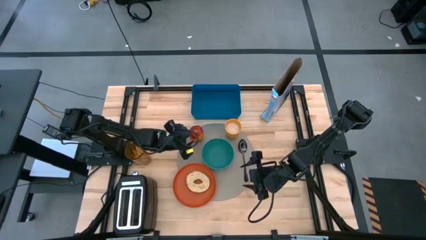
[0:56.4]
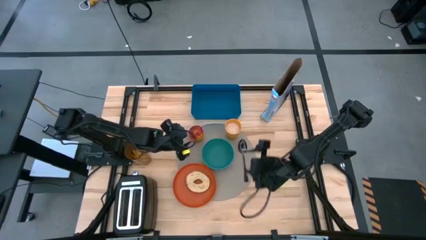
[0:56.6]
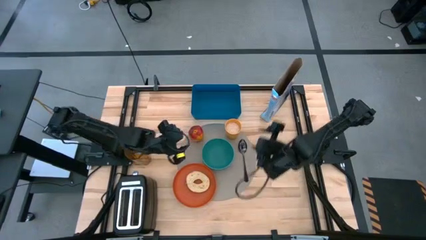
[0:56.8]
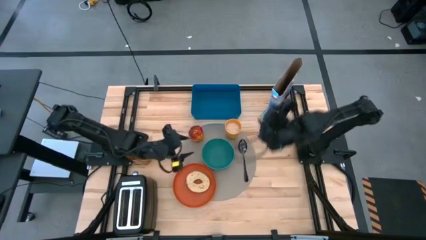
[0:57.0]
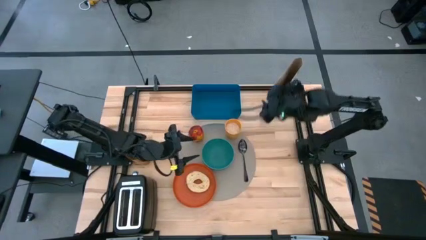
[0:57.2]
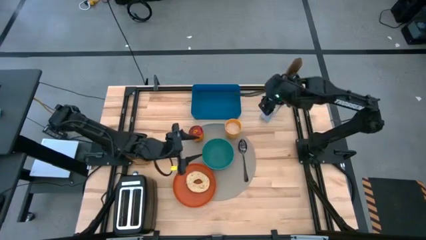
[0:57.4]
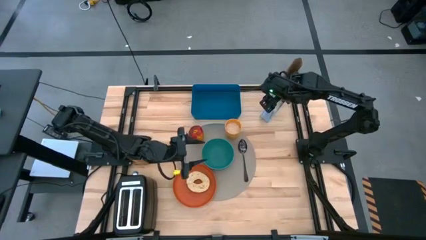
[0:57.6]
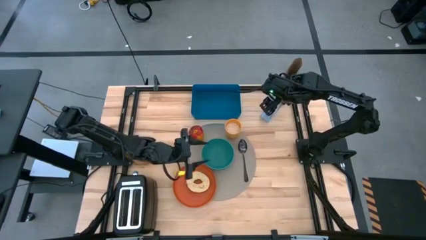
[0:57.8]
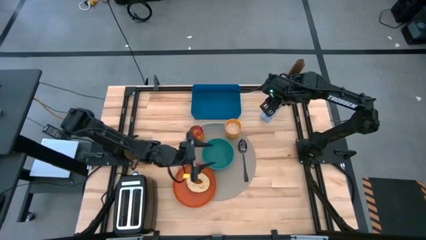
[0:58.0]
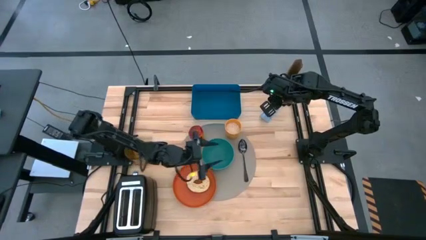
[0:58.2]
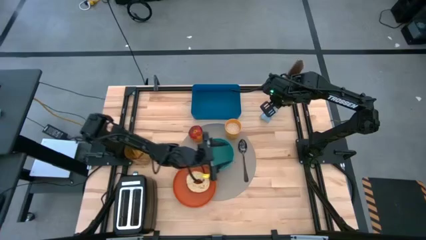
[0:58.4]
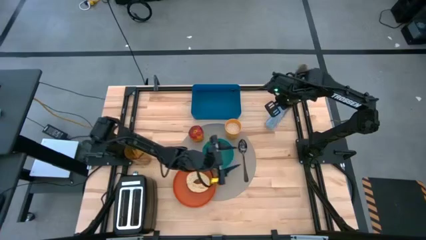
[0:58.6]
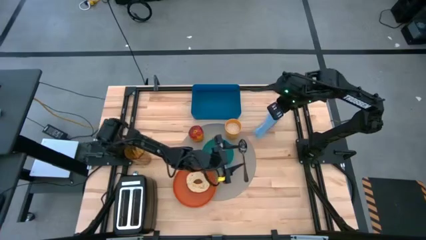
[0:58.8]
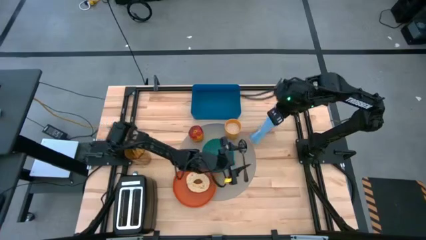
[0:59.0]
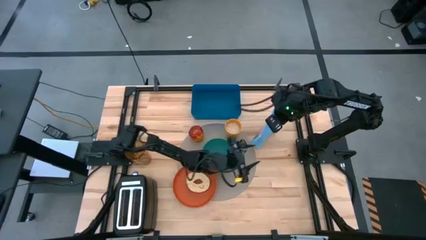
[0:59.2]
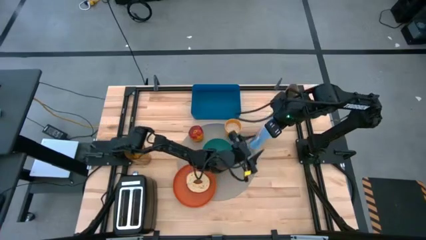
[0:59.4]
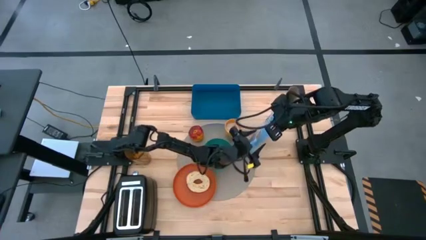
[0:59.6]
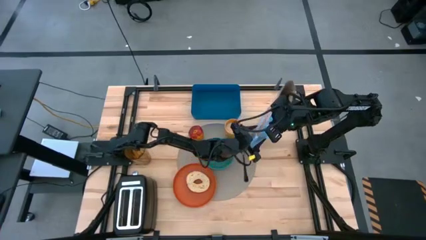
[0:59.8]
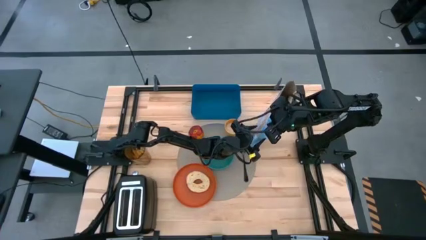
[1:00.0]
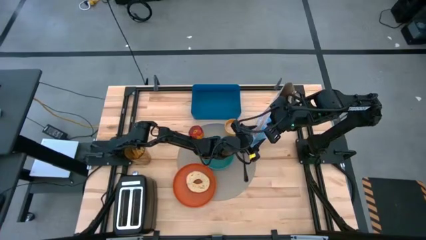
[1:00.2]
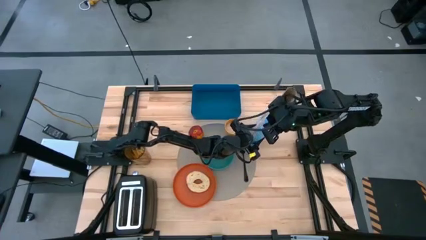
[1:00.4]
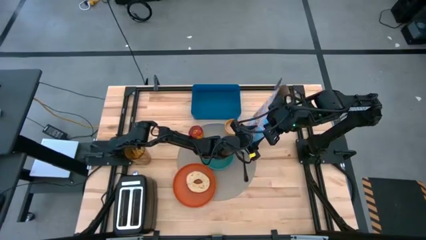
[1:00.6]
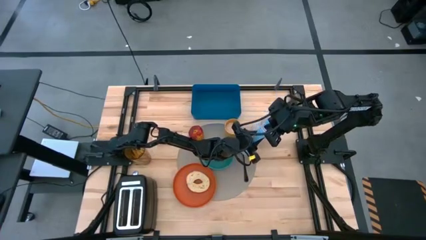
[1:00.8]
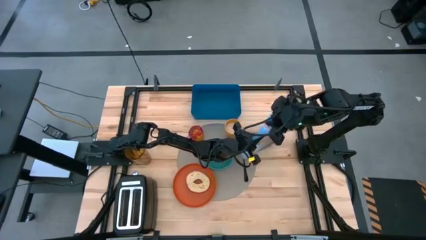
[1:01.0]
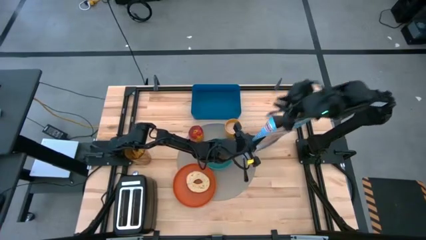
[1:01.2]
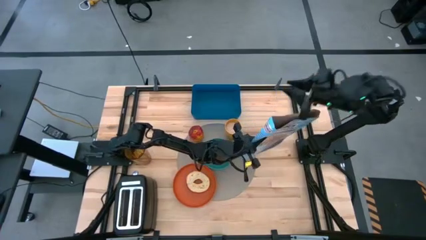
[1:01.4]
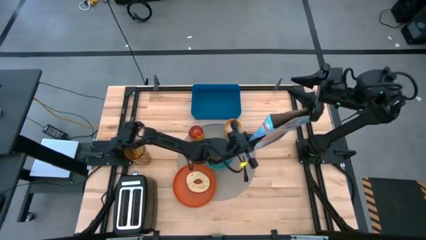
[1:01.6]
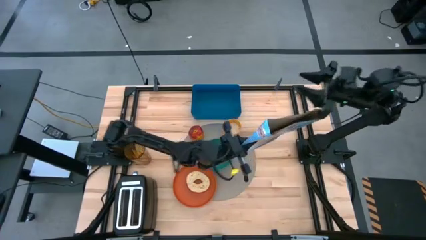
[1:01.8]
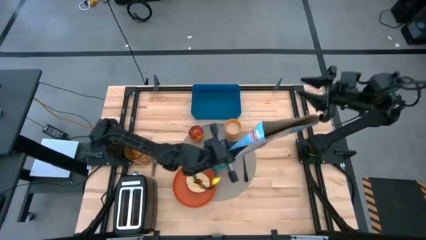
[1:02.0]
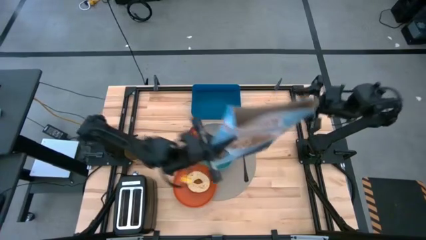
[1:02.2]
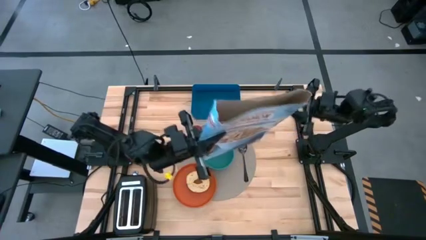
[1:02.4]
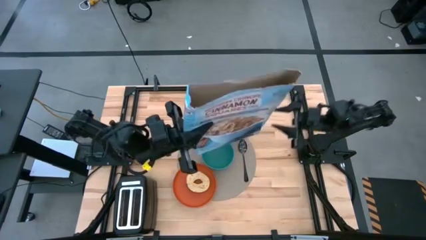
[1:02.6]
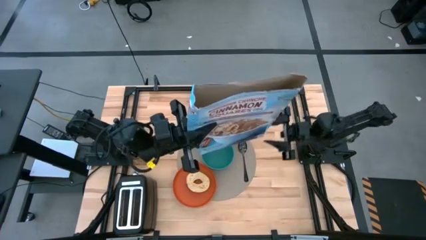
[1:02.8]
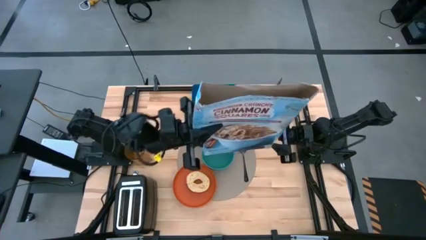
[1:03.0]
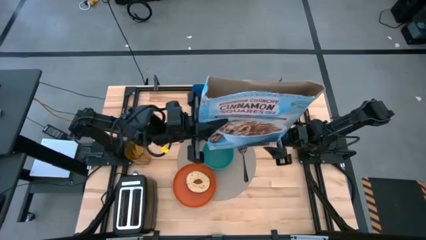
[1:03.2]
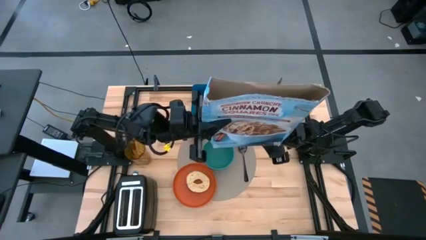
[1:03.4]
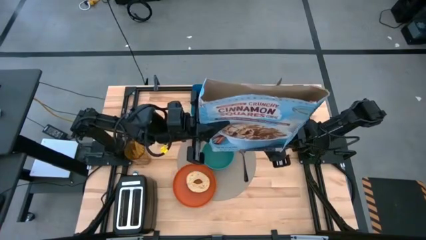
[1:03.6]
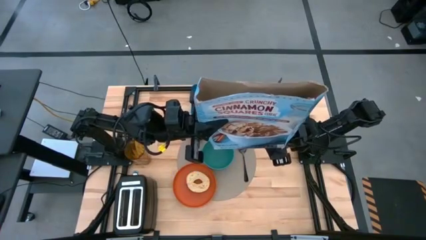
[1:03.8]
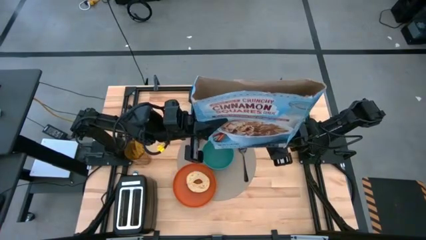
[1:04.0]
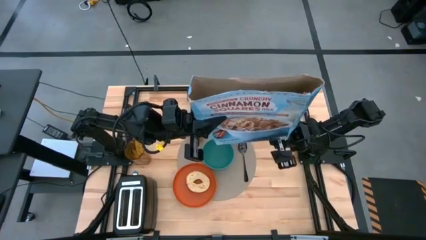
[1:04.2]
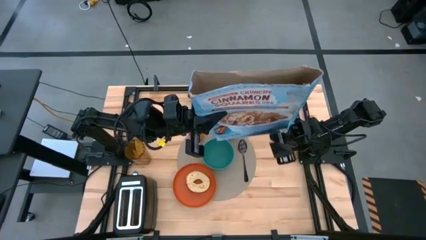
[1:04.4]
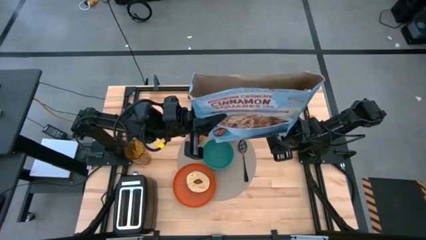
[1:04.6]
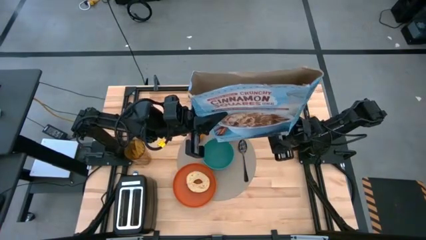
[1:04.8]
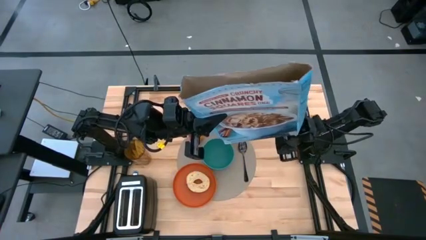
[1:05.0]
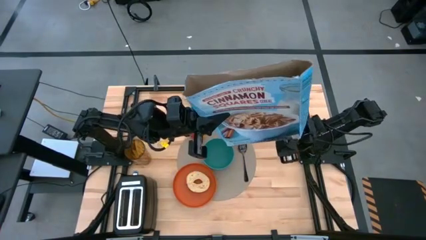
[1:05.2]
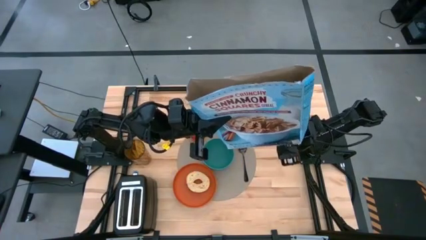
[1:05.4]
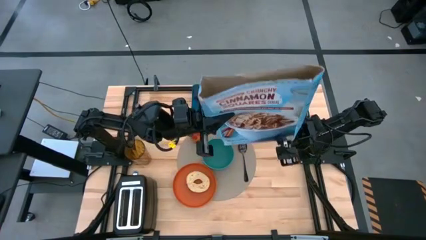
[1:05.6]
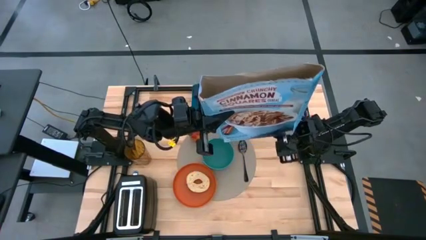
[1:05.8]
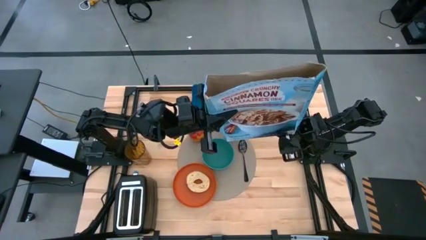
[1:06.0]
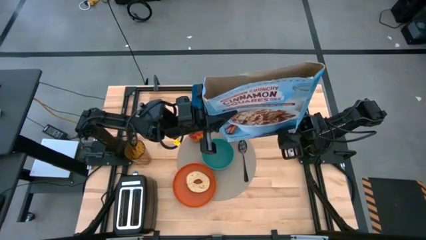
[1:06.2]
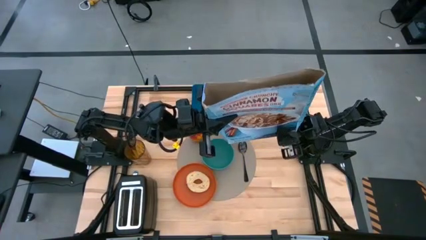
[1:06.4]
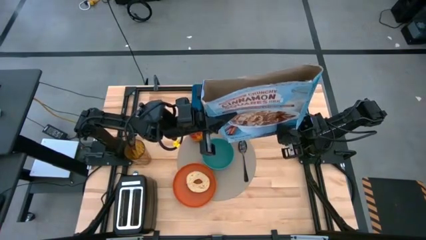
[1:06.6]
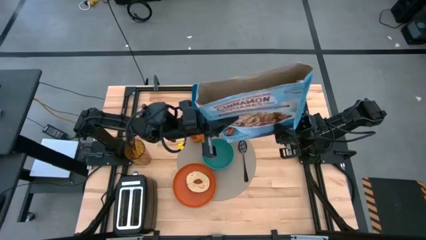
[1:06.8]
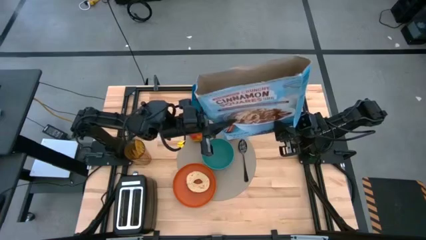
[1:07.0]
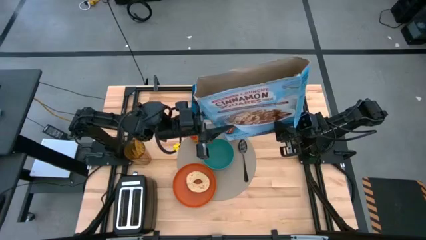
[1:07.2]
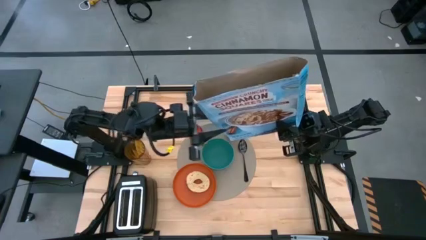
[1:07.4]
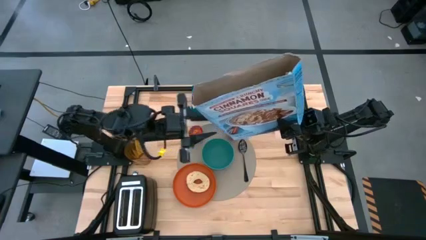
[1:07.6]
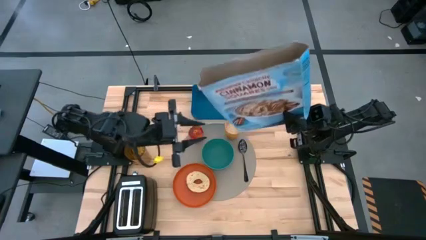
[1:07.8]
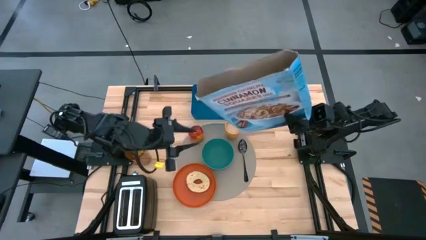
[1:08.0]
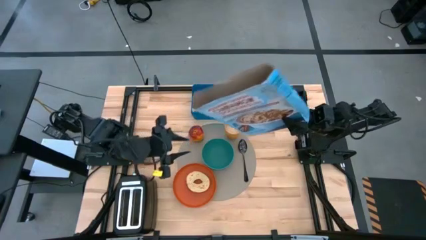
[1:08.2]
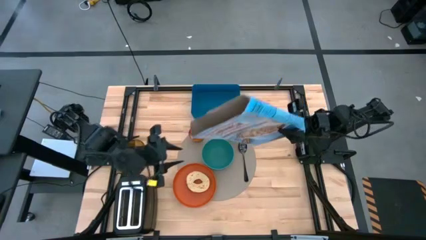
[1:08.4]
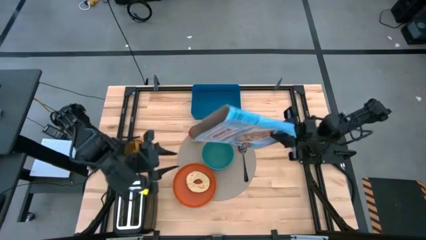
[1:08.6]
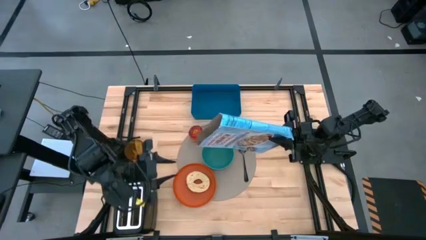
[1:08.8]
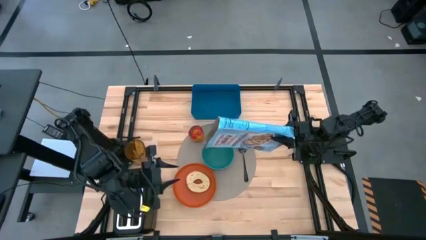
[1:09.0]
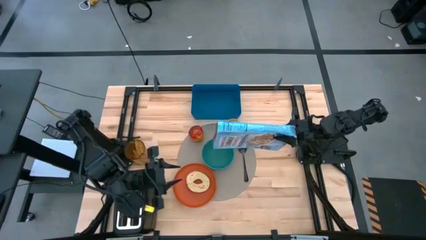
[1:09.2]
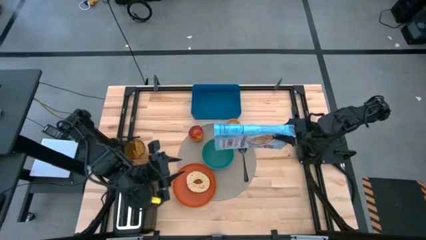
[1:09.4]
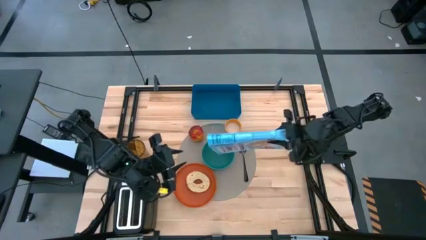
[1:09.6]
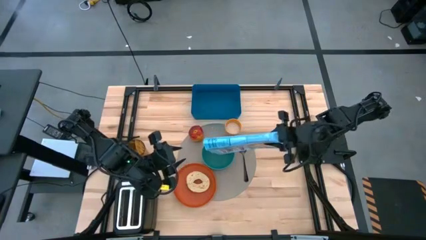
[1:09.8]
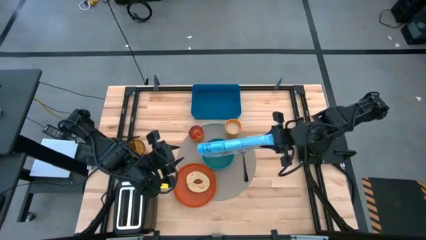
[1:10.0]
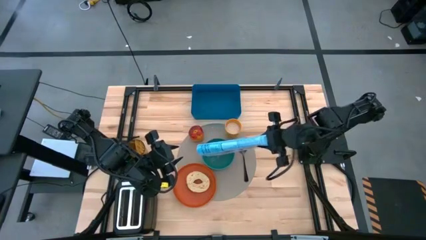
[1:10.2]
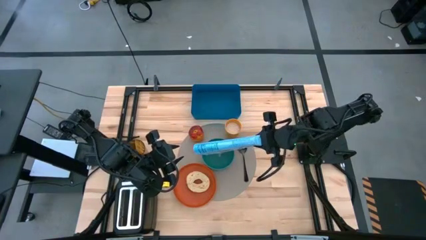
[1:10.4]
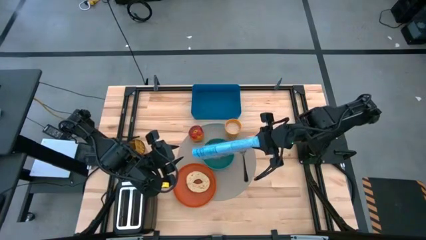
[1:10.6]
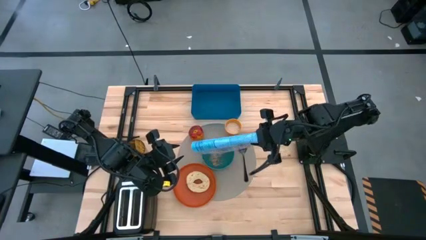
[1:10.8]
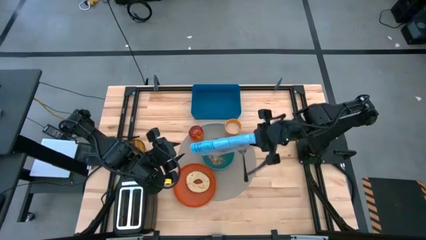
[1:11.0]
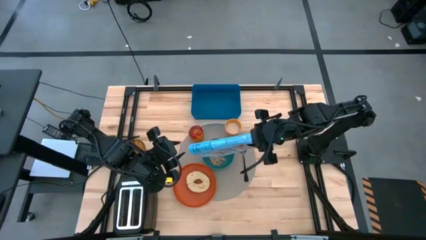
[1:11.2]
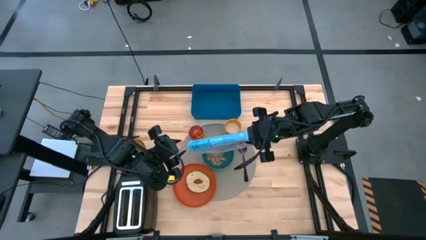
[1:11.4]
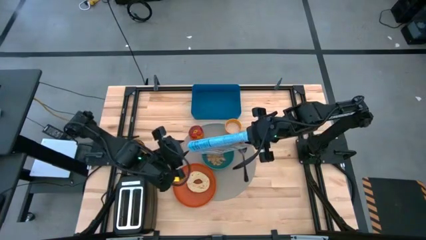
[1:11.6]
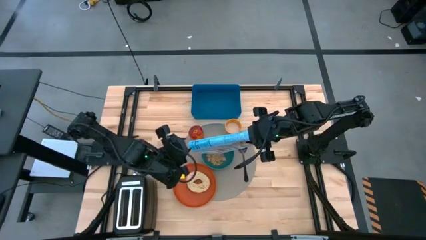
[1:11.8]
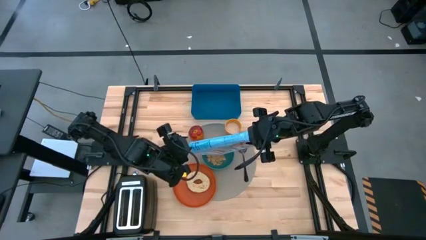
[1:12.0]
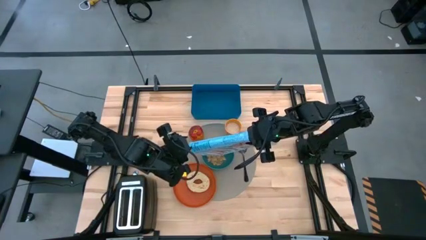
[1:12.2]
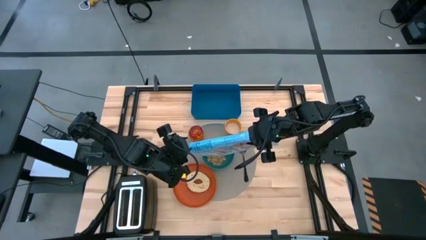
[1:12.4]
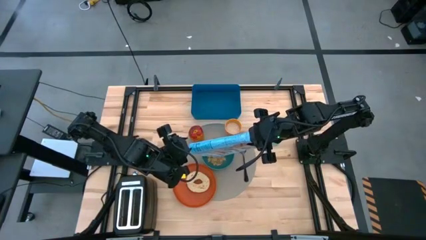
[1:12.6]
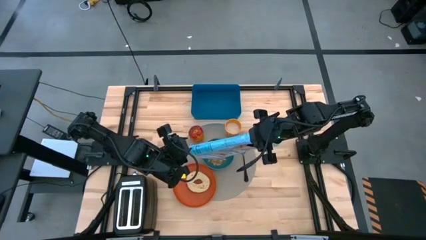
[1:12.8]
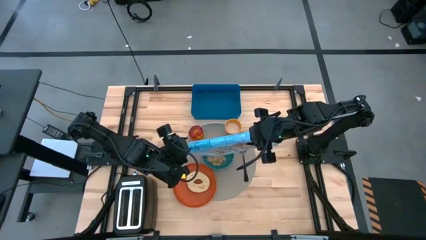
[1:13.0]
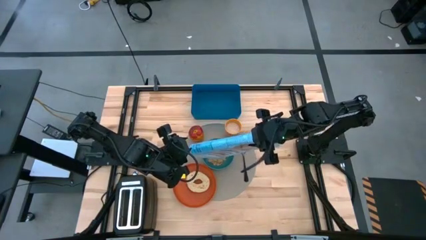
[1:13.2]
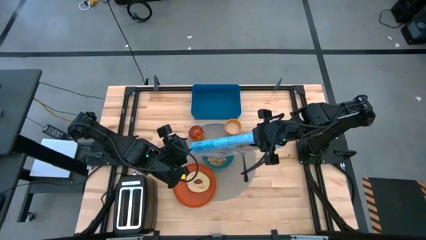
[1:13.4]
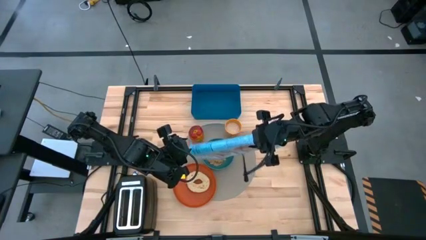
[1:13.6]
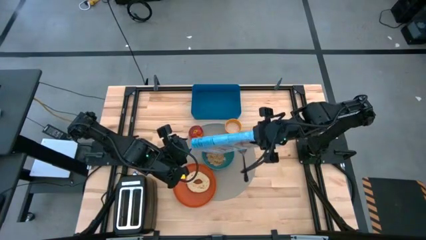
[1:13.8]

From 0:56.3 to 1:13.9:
Task: Arrange a breakfast setting
Pour the cereal into the green bowl
